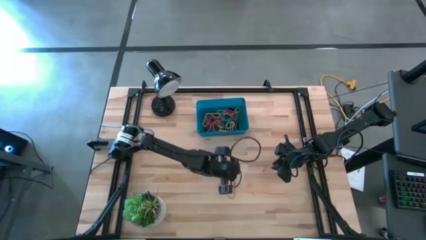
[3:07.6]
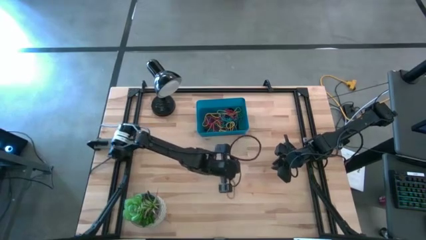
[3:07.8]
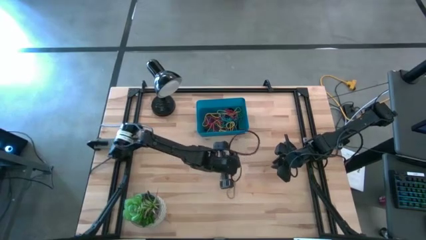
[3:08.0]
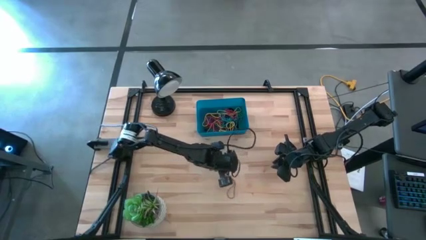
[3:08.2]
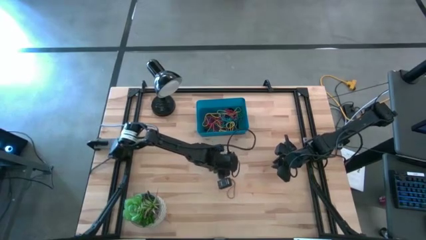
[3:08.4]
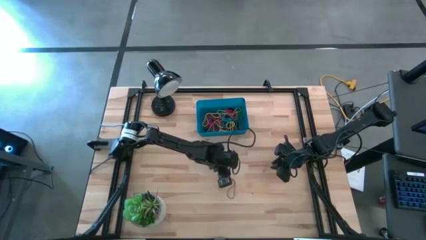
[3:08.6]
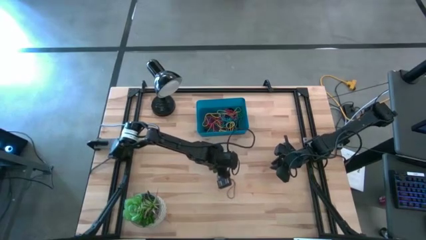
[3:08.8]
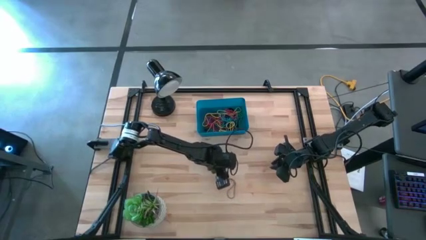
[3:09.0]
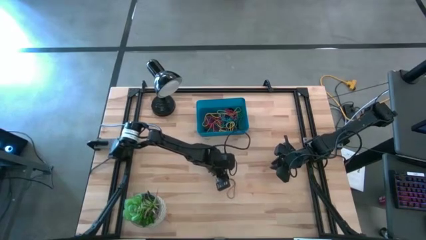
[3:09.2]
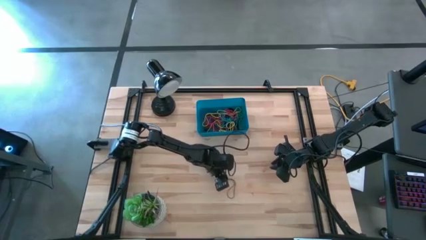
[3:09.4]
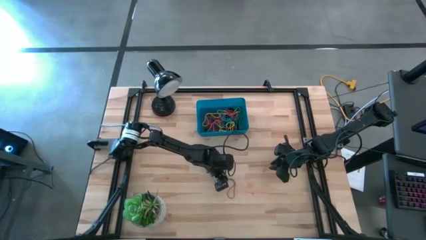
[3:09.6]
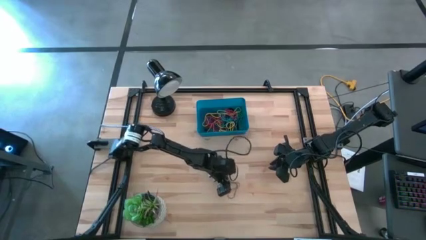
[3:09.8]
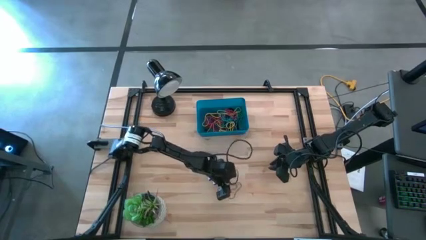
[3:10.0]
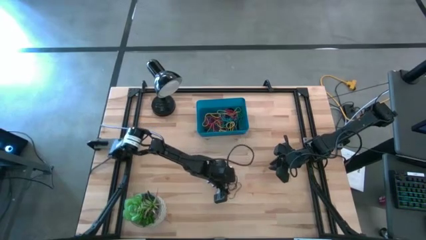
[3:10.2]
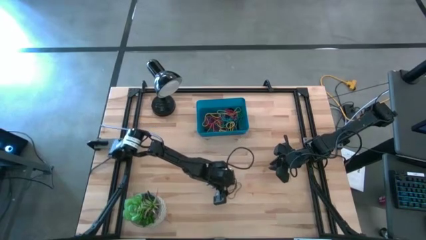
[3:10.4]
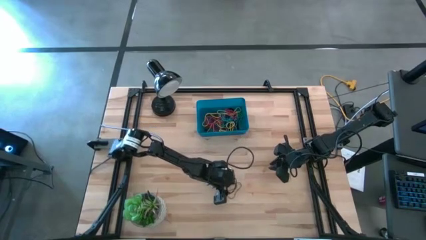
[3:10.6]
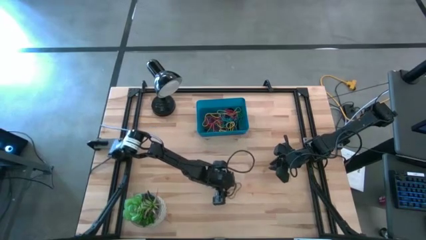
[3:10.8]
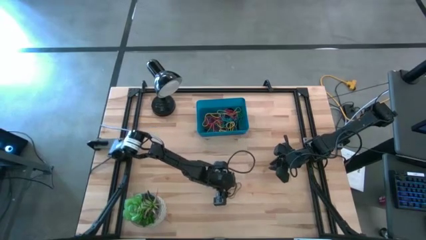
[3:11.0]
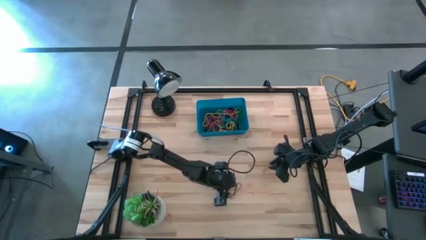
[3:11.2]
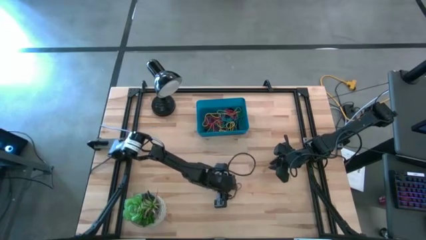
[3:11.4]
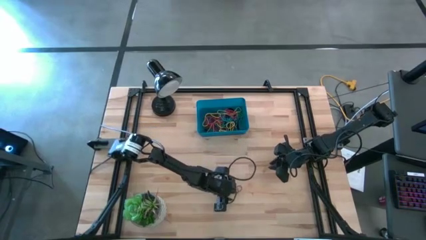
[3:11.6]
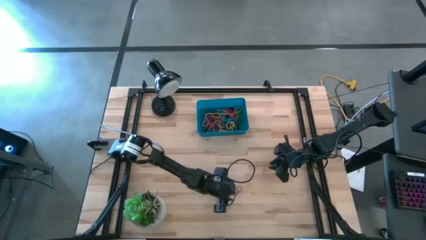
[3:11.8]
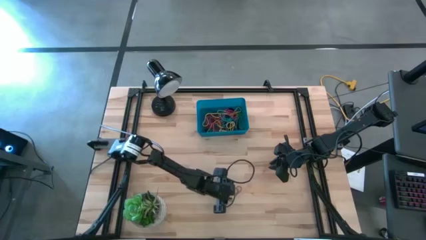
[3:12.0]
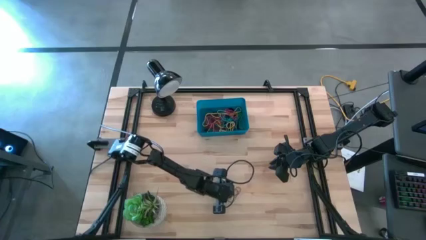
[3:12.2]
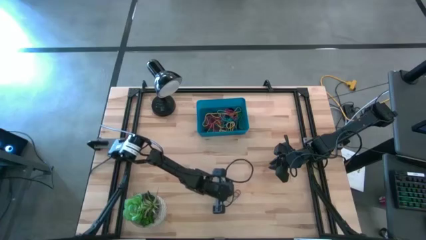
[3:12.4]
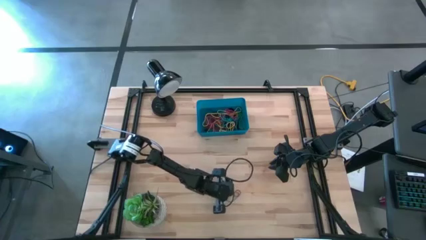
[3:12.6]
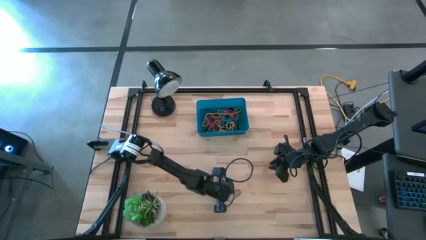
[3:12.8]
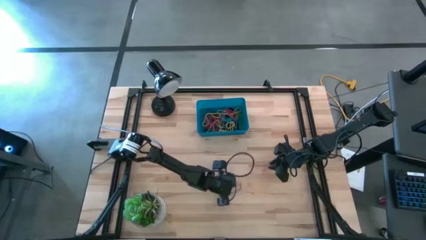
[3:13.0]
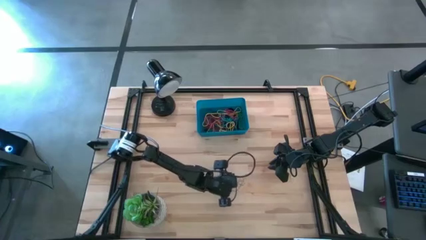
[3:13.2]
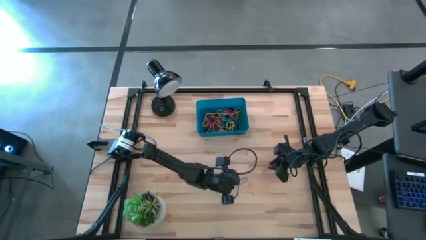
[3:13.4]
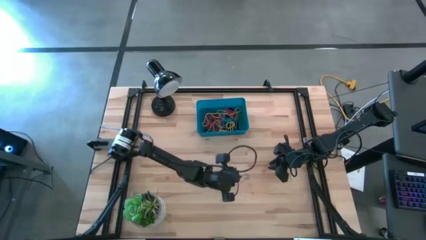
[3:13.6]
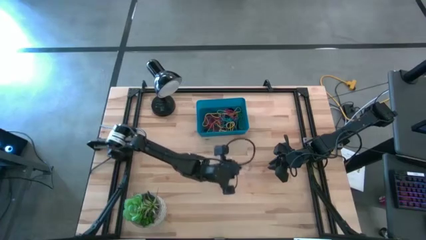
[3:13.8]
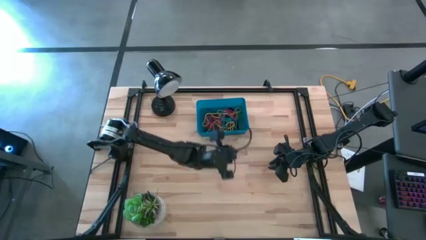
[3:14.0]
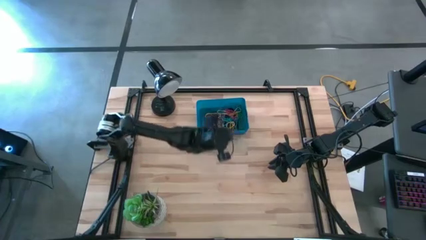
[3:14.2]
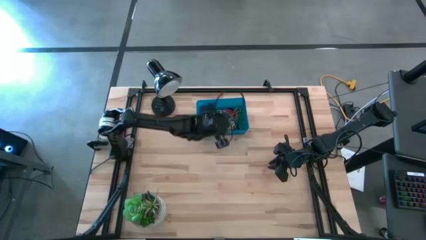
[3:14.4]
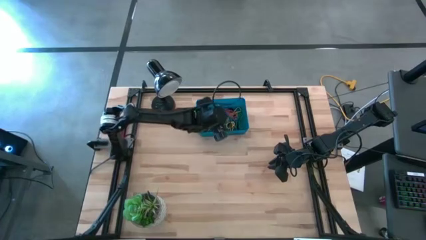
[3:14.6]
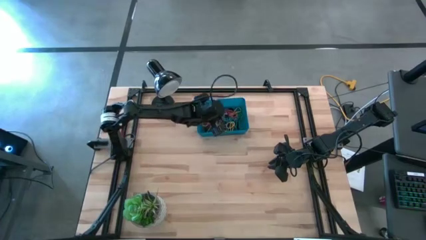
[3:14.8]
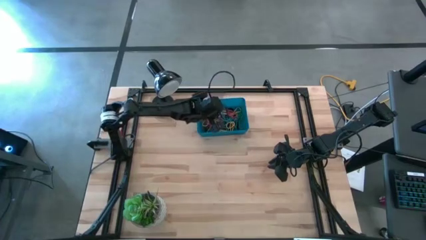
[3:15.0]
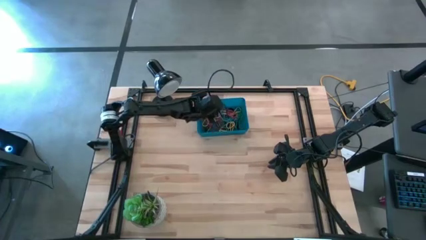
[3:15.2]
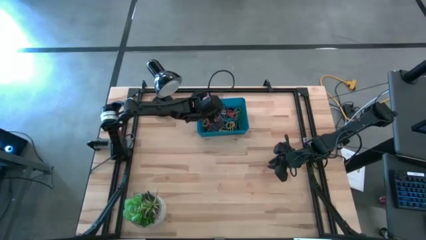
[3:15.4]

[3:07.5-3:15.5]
Task: Pick and place rubber bands into bin
Put the purple rubber band into the blue bin

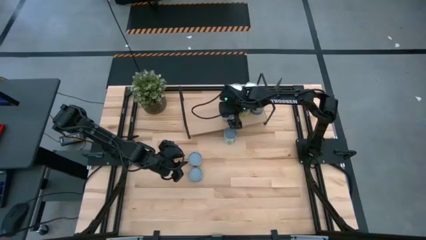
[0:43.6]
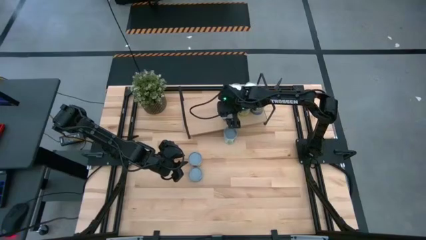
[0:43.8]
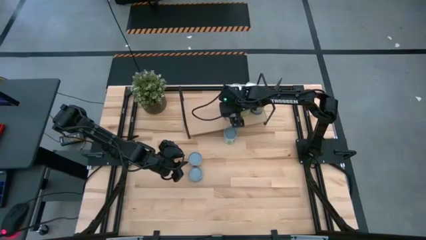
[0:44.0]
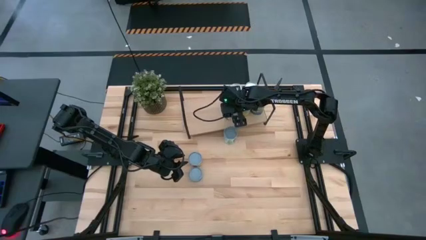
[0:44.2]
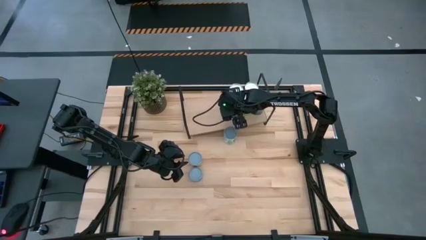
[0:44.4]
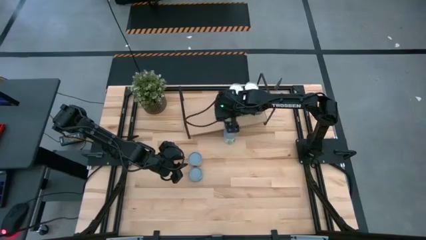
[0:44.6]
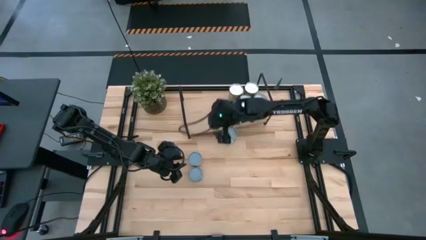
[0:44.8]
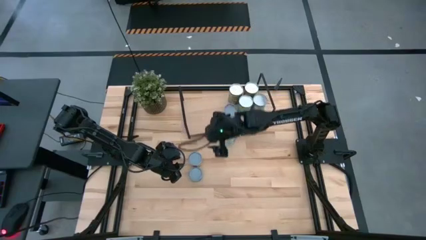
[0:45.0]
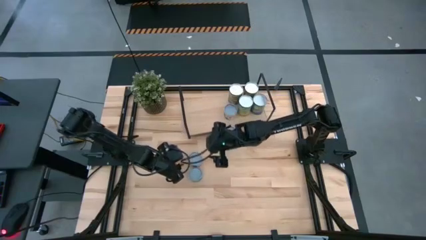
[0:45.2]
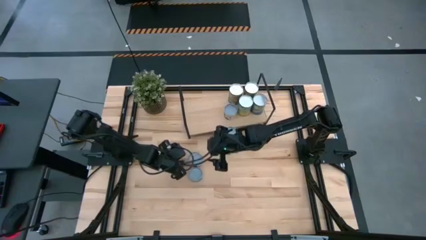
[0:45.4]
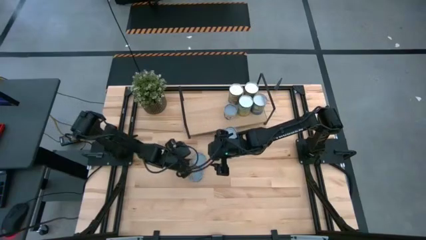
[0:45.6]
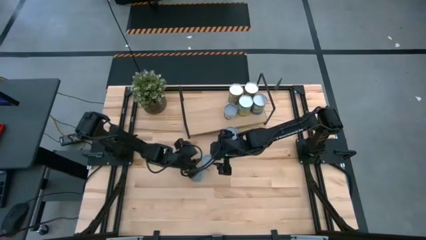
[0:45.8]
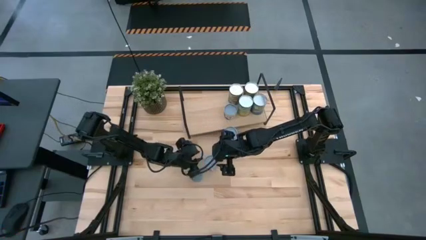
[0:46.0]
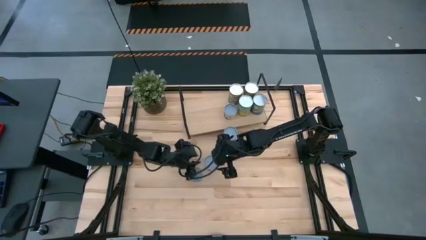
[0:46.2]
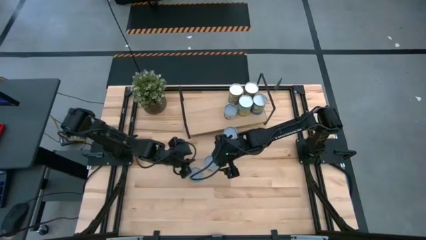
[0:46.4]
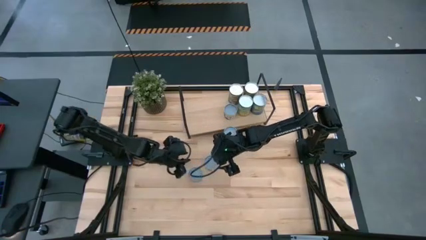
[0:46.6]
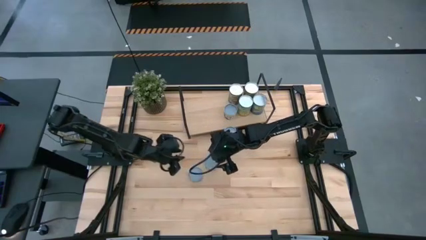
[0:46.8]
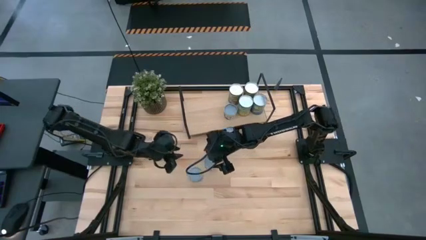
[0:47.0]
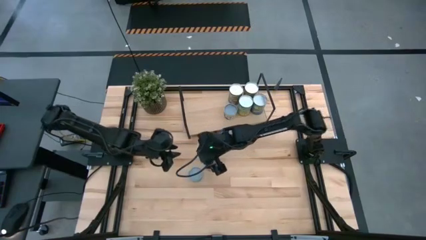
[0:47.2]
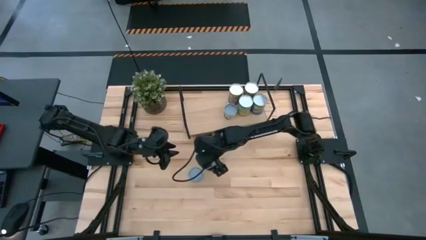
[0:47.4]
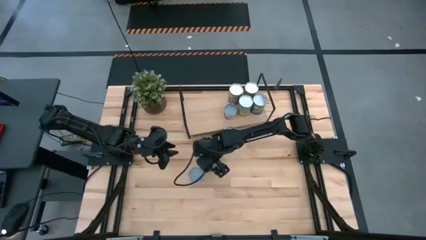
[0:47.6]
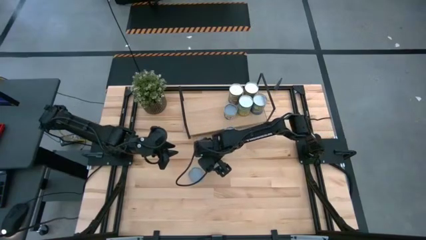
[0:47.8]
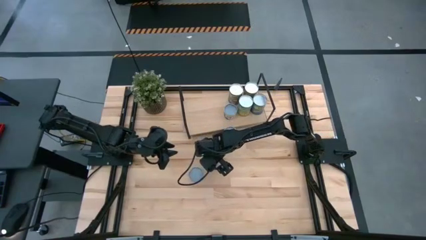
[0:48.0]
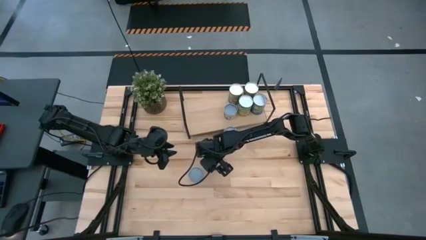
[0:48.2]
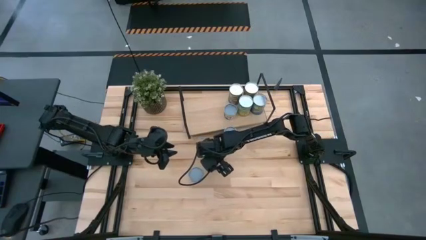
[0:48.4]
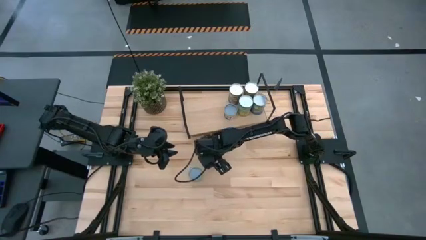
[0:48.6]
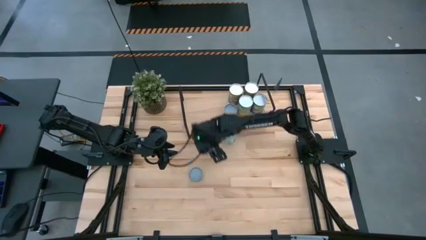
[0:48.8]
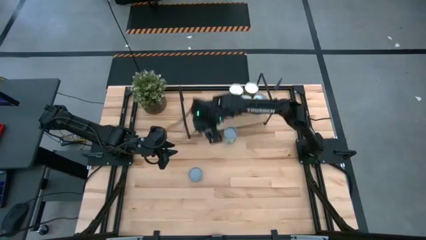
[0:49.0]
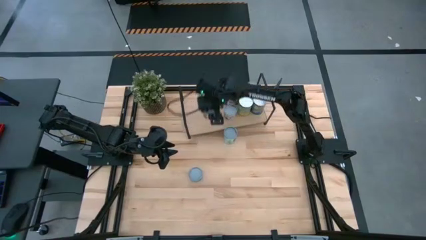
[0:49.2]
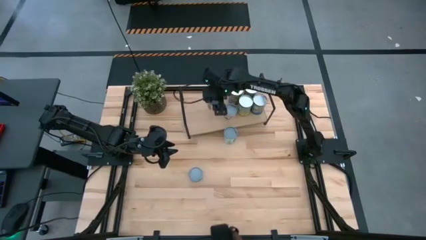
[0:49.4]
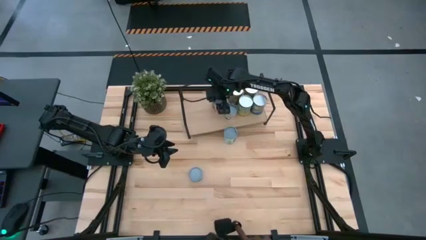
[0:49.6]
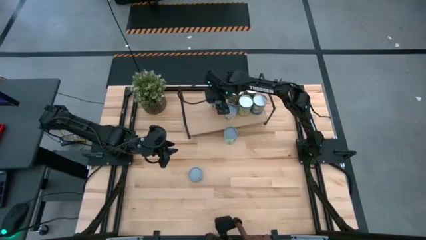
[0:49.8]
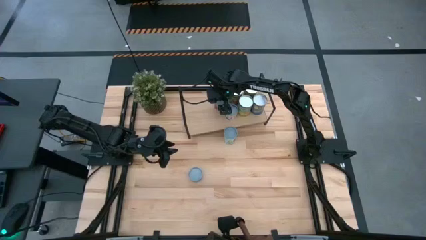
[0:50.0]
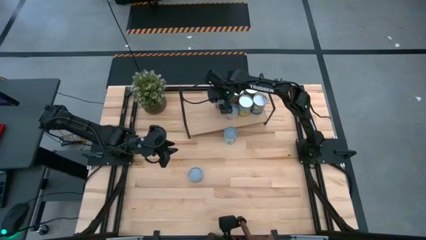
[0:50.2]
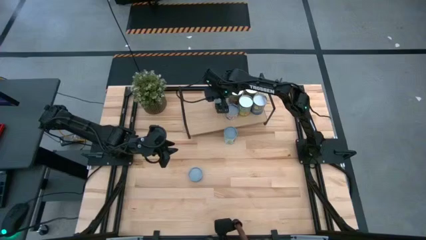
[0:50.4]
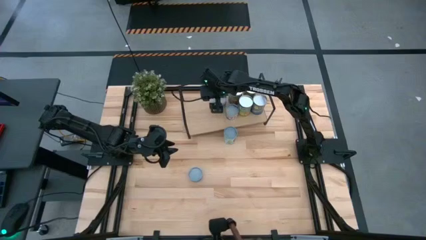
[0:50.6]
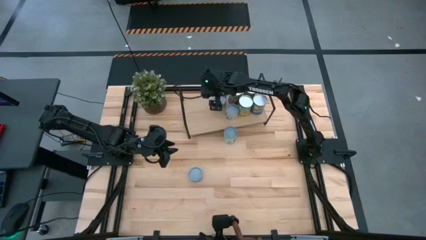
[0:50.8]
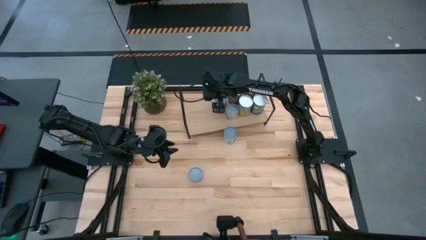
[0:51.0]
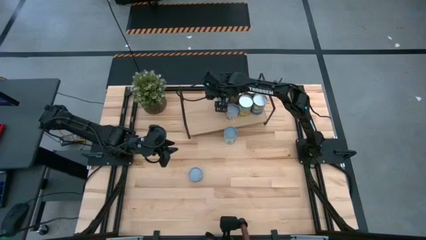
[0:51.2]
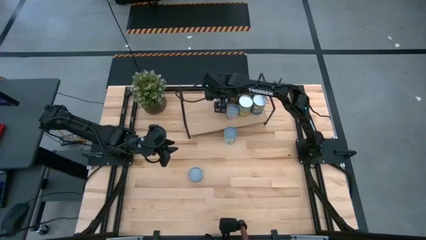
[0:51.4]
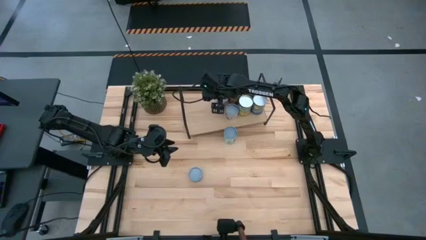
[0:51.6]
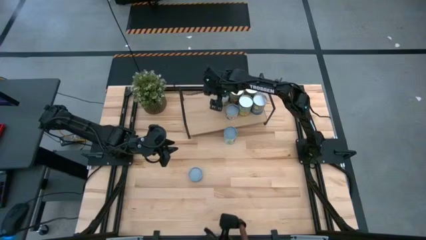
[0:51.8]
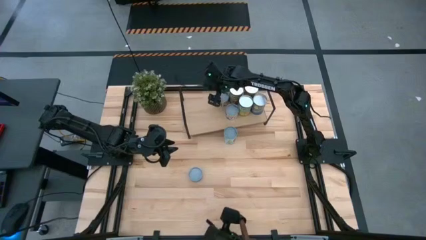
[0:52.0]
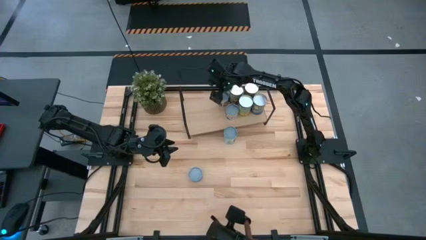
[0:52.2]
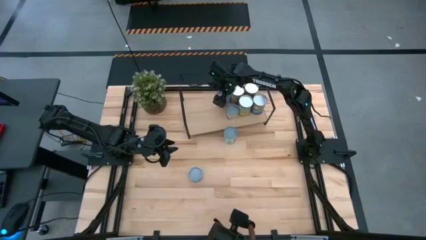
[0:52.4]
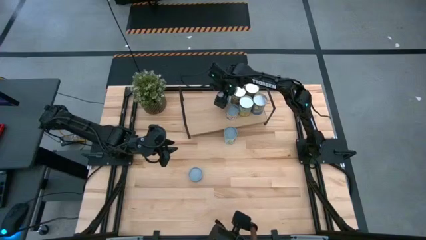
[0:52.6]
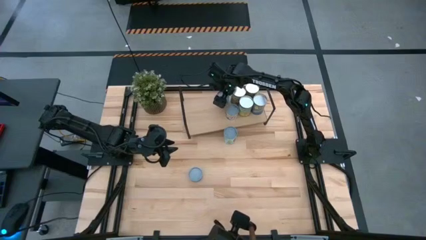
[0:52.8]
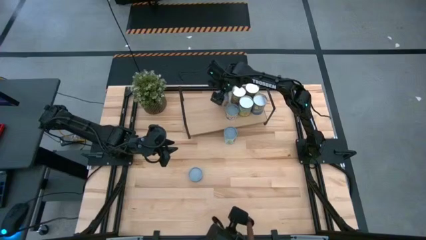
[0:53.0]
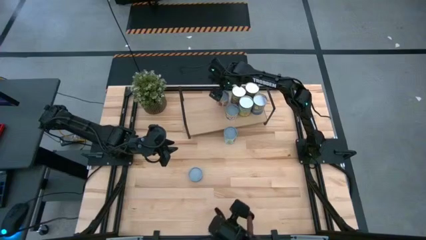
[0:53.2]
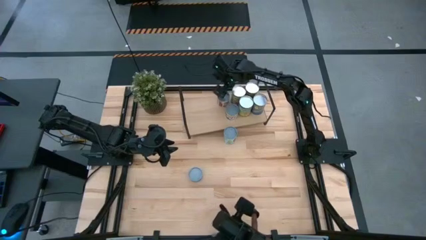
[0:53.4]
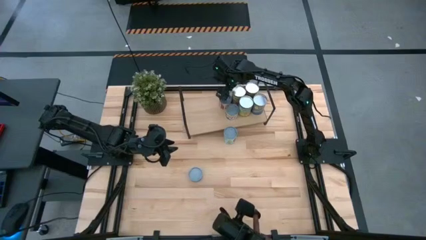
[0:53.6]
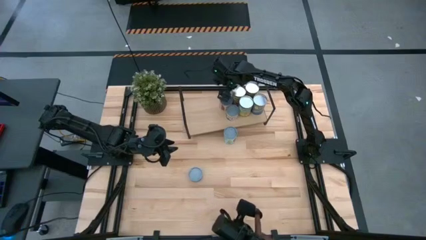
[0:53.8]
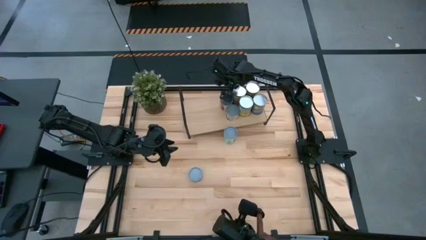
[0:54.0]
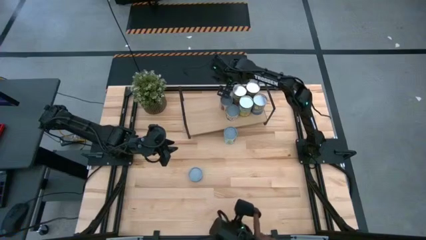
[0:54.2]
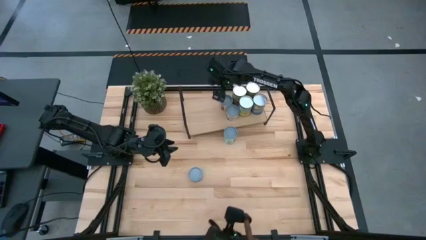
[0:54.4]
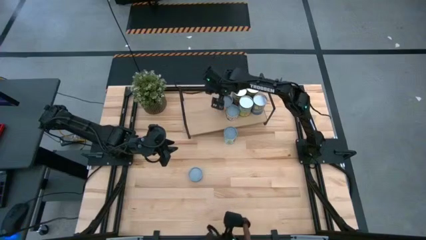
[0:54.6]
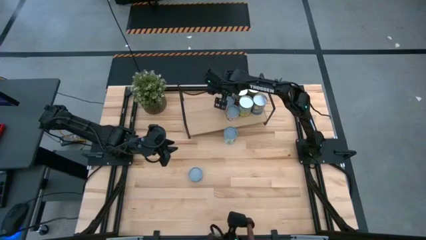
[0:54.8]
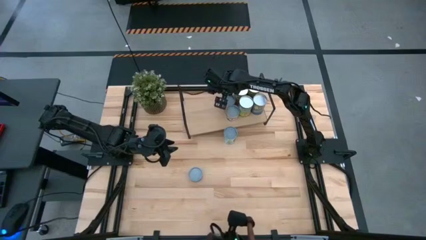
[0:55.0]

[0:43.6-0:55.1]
Task: Pick and place cans onto a shelf
Put the canned tomato can on the shelf
